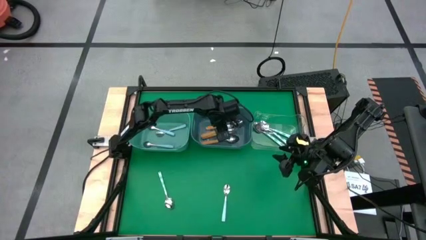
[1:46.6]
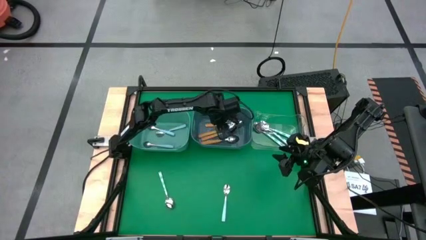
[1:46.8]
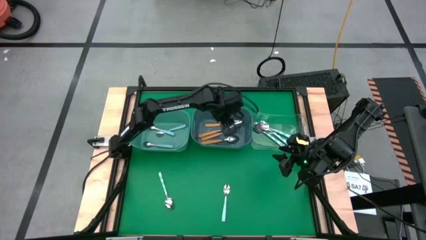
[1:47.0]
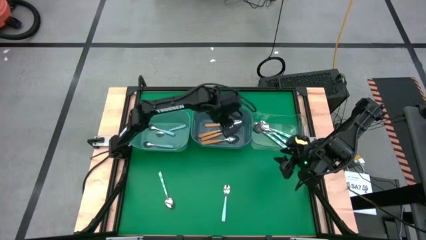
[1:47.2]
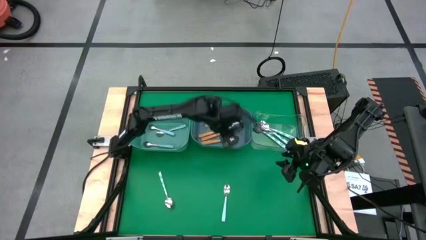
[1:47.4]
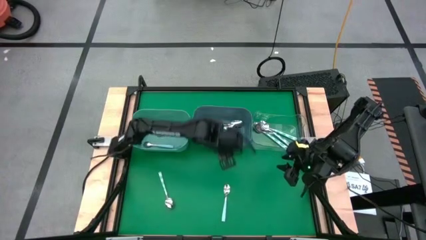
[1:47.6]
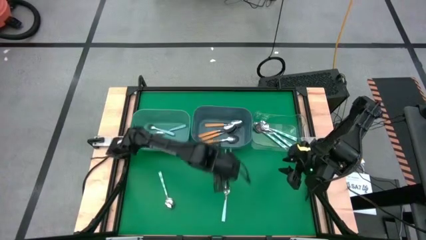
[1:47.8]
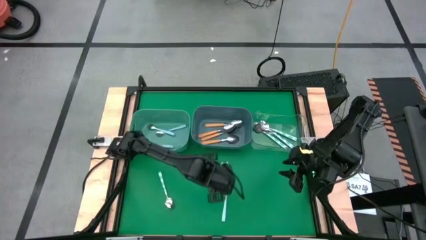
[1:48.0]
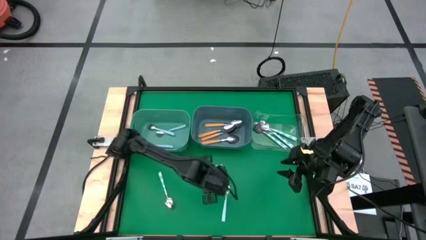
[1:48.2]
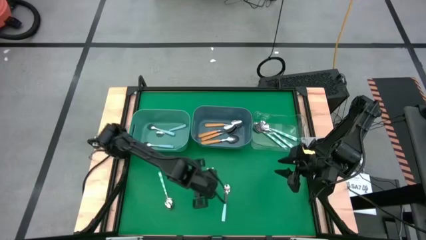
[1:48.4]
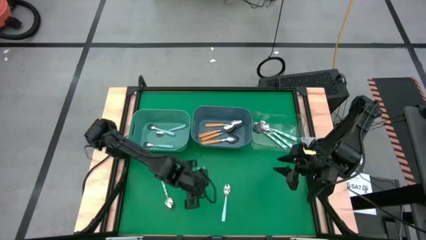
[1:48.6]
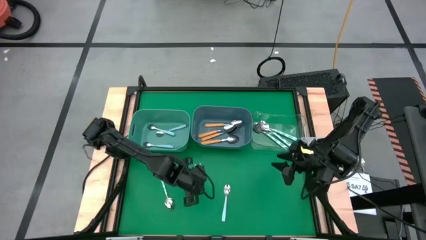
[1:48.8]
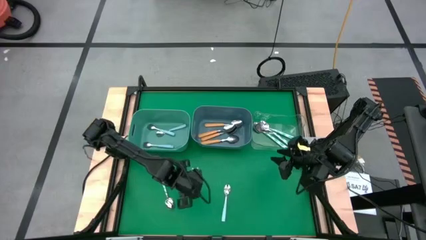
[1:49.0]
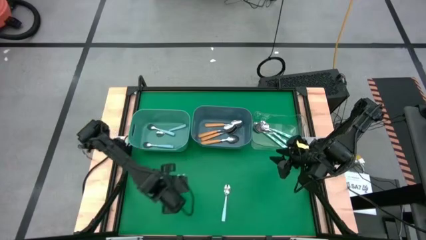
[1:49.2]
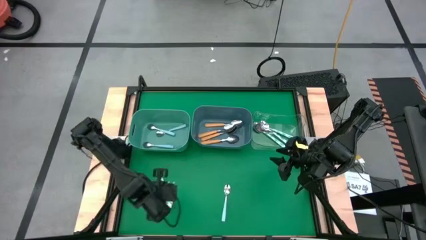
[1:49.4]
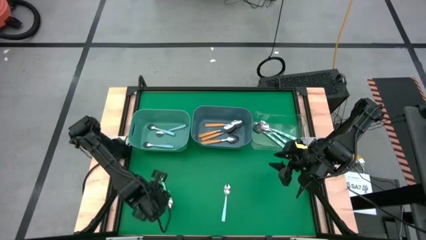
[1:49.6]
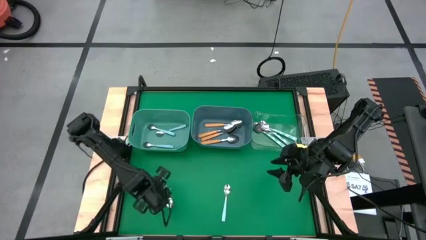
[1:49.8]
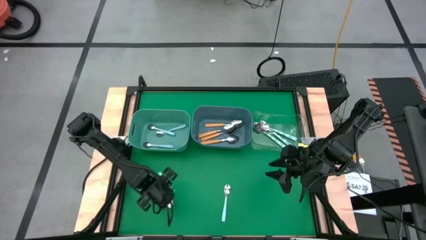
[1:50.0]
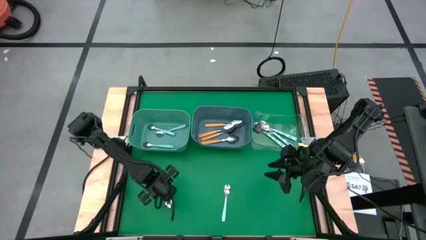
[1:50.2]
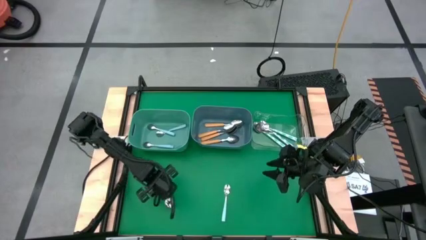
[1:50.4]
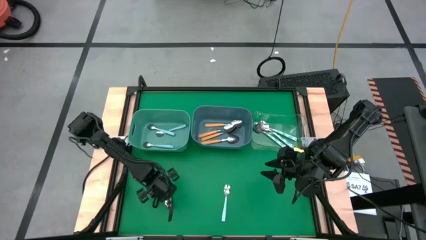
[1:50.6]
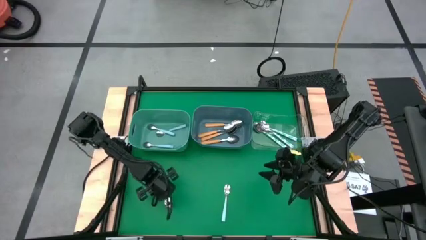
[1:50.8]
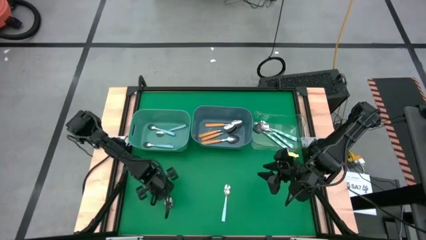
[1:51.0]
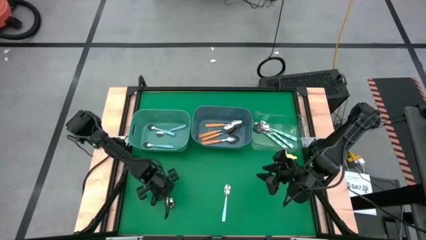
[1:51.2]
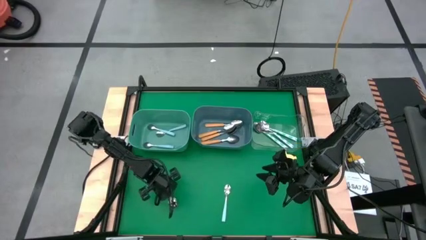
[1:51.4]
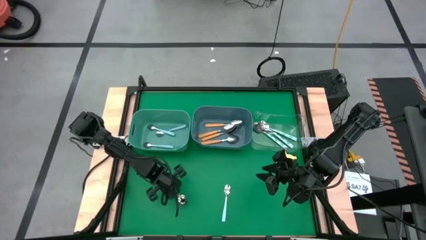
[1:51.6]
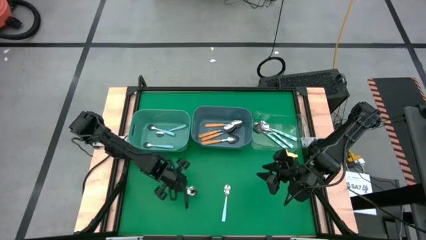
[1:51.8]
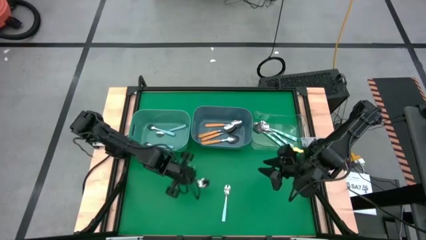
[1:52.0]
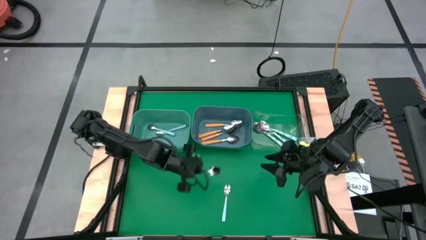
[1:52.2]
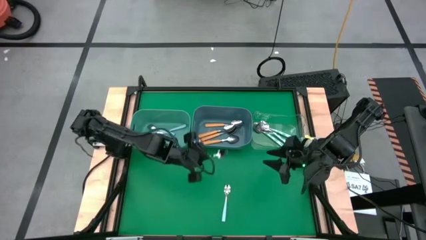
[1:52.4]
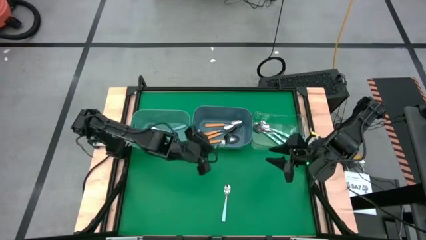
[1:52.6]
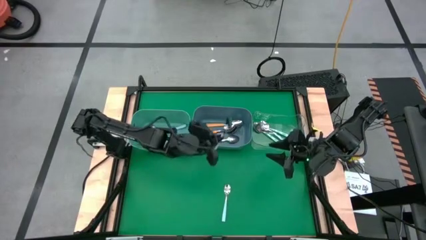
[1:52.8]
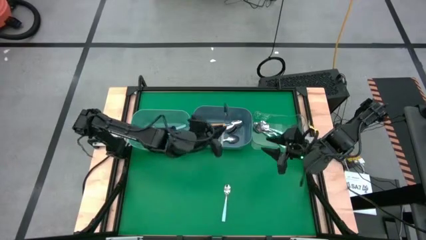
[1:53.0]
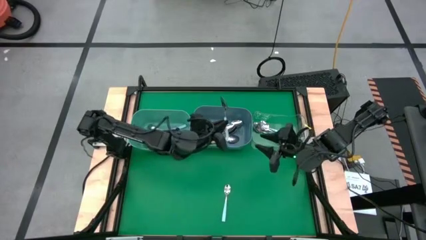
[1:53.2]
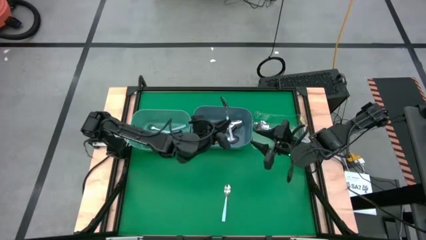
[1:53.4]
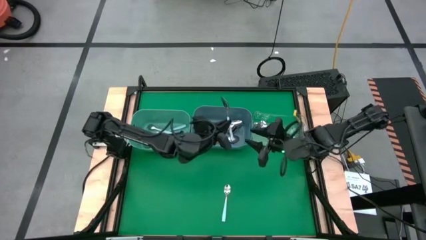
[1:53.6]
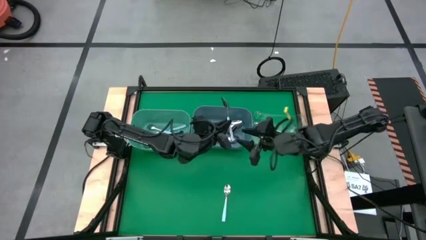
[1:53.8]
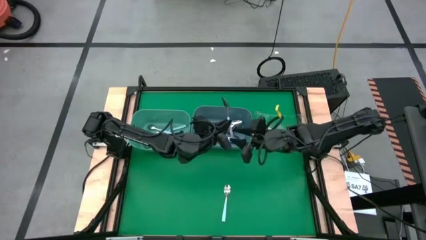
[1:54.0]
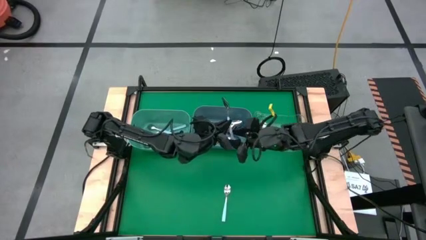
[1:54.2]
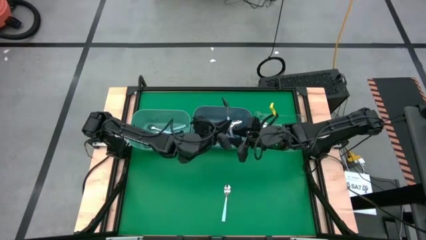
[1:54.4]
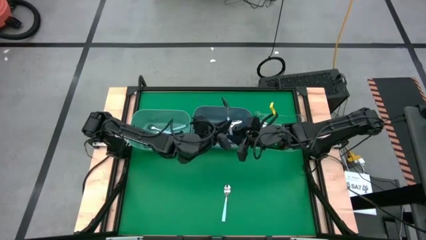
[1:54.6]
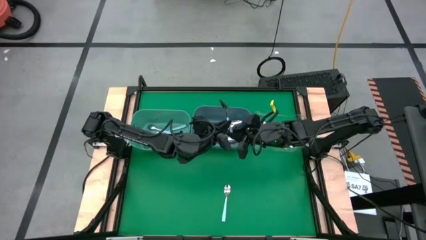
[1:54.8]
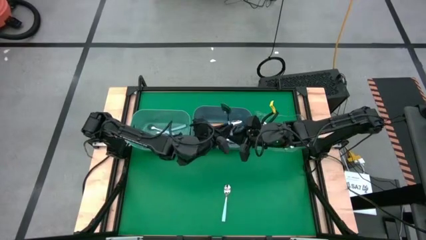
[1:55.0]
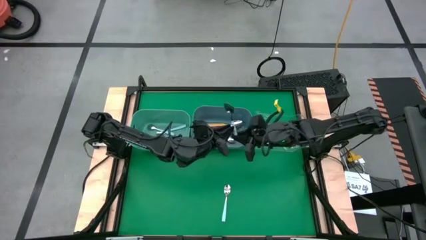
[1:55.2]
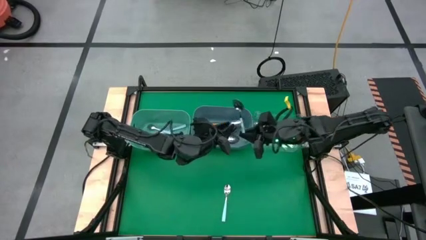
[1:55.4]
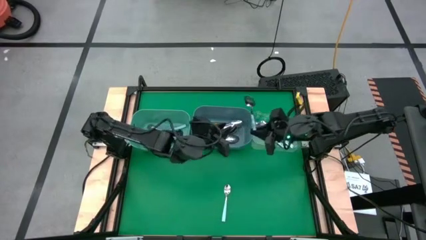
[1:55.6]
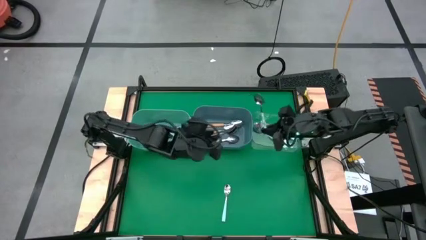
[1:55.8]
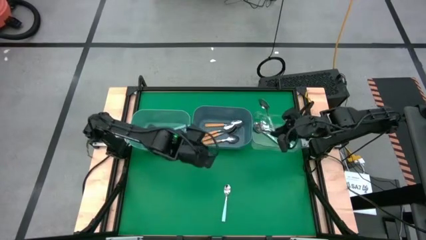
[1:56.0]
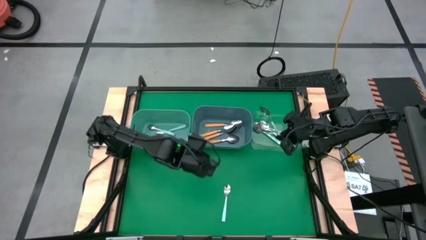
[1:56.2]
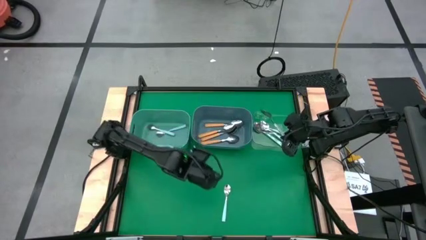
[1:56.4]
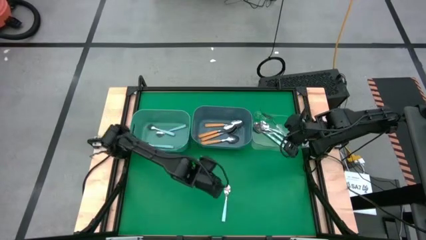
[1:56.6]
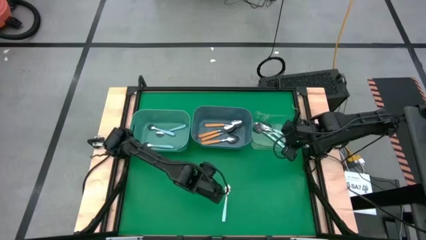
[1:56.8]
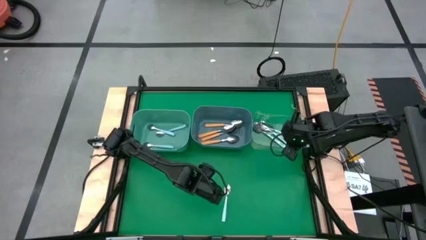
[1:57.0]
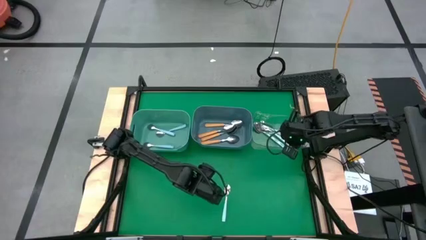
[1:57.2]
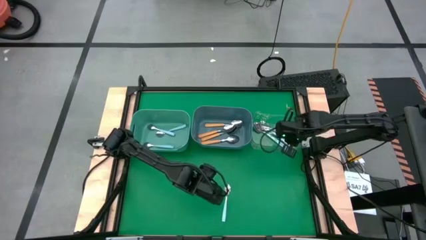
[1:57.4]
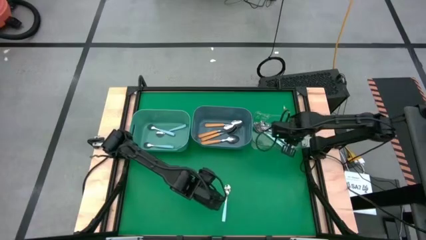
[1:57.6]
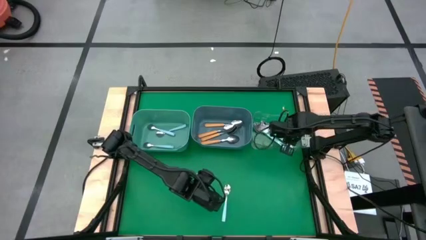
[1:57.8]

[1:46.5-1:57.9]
Task: Sort silverware by color (type)
Put the white spoon into the transparent bin

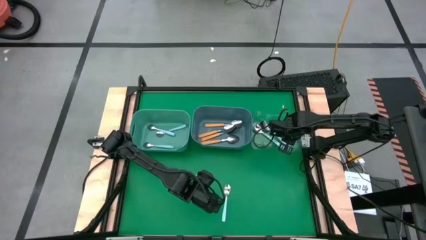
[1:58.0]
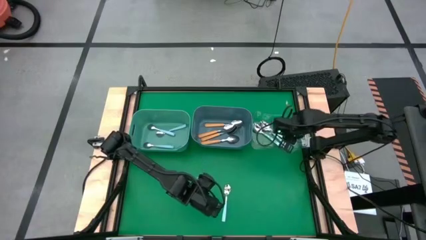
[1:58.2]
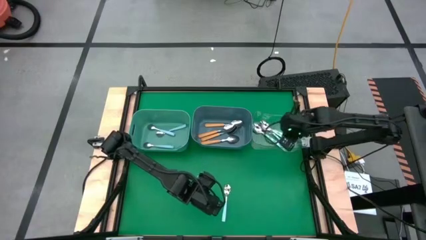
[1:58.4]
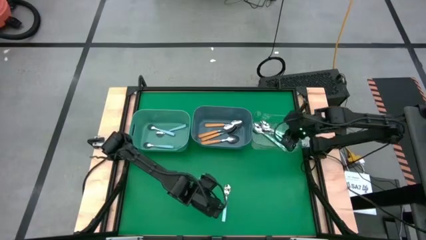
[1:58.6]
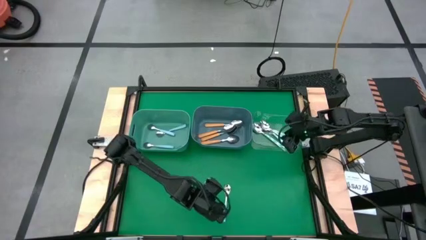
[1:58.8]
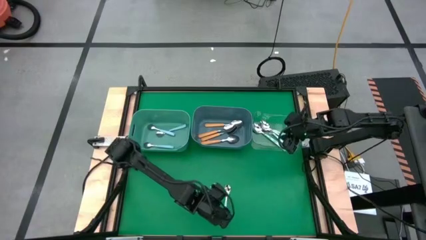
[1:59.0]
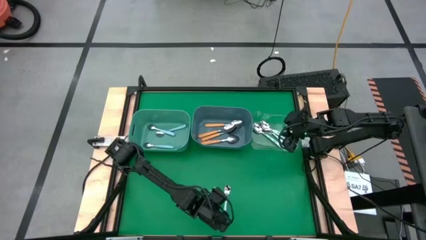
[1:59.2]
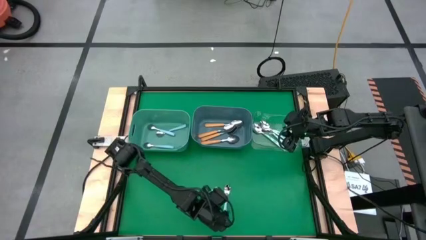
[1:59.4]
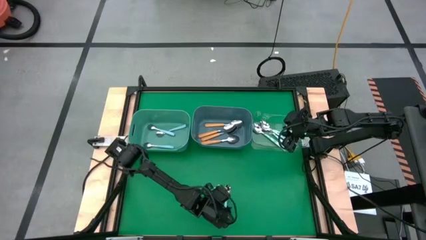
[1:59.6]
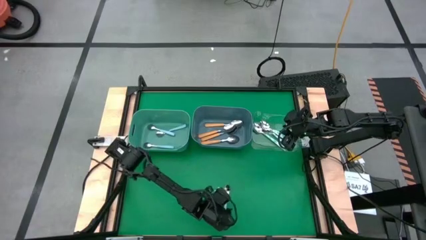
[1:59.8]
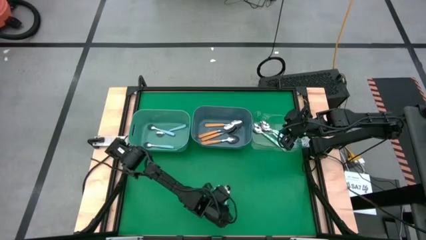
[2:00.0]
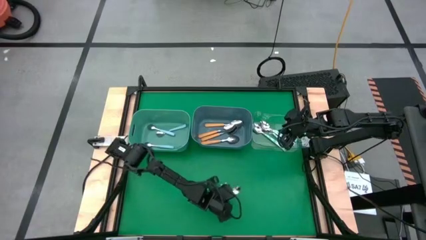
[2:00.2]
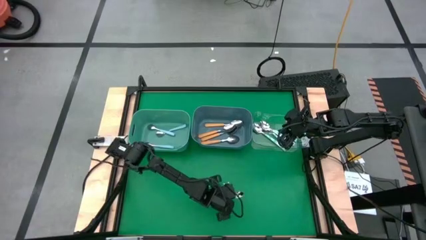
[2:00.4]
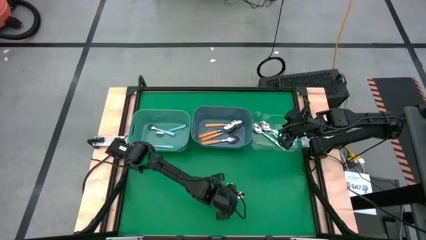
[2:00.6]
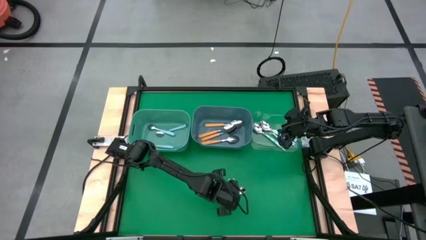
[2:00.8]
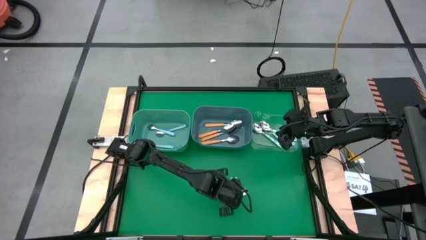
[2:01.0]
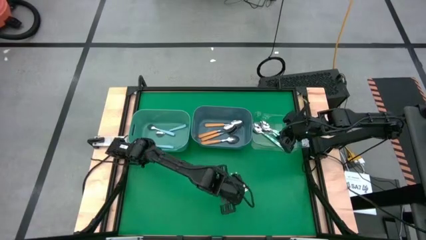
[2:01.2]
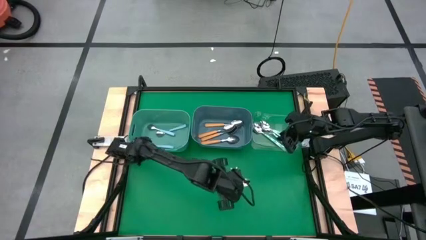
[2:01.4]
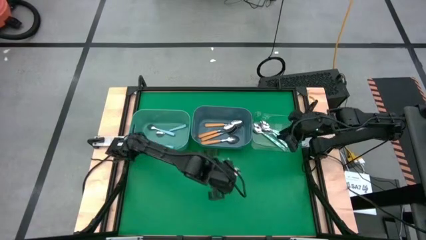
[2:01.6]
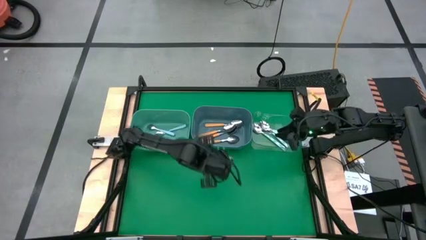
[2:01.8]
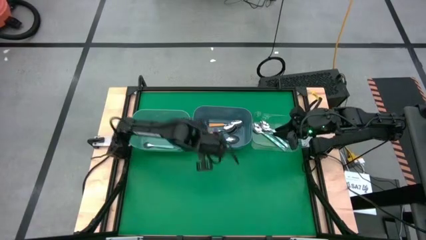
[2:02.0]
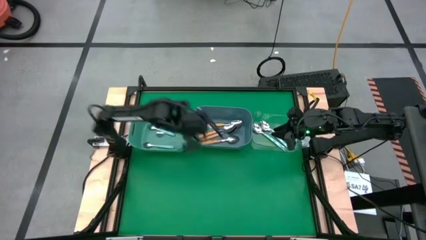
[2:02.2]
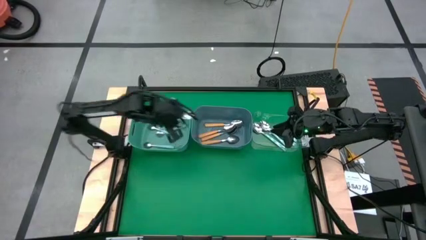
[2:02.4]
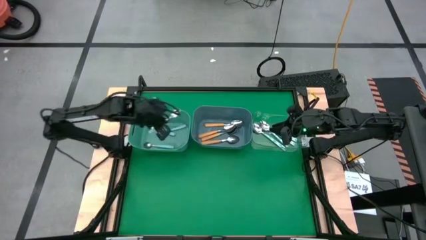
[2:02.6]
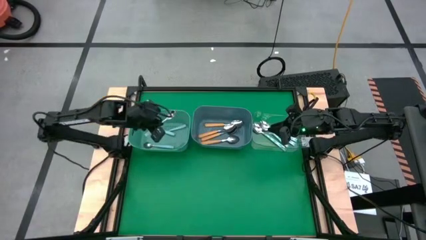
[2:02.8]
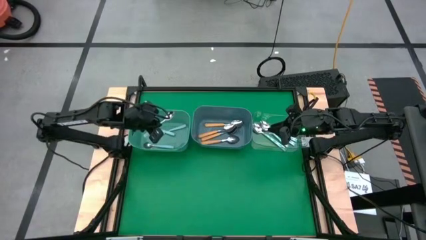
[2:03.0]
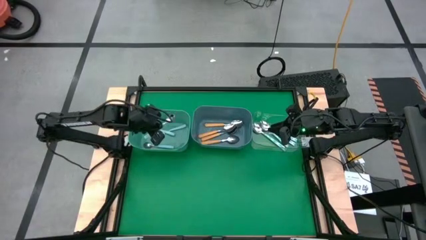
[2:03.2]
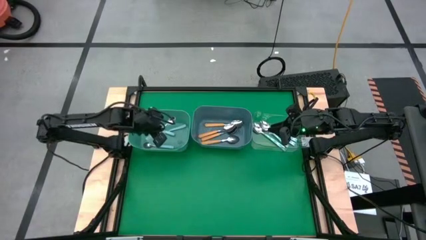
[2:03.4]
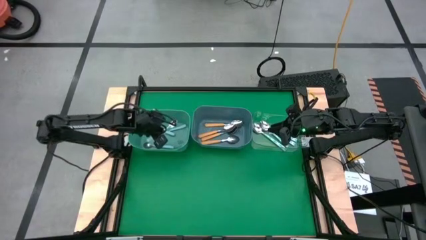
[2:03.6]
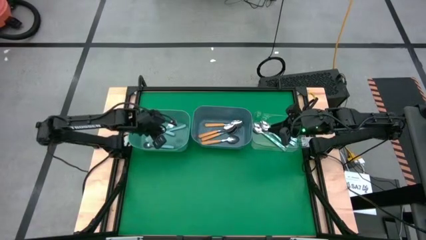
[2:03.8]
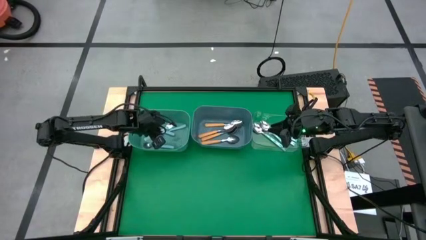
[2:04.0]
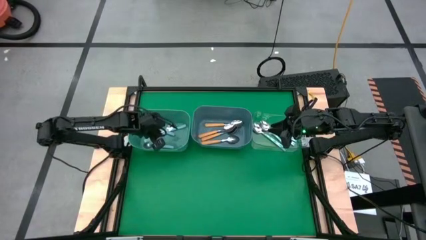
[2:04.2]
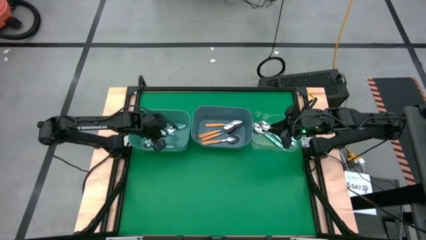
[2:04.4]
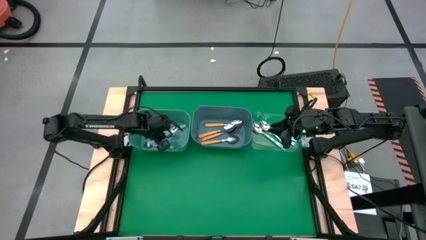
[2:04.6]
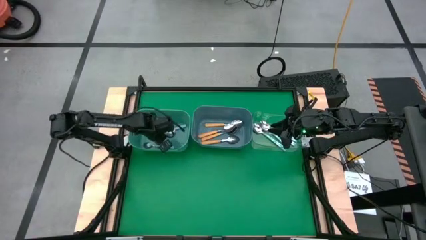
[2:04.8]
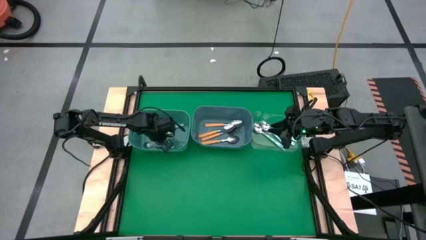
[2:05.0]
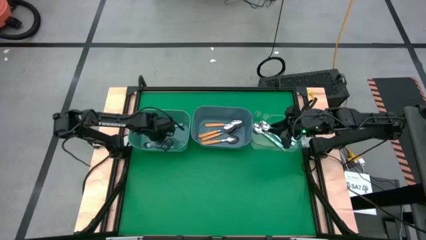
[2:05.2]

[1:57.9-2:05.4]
Put the blue spoon into the green bin
